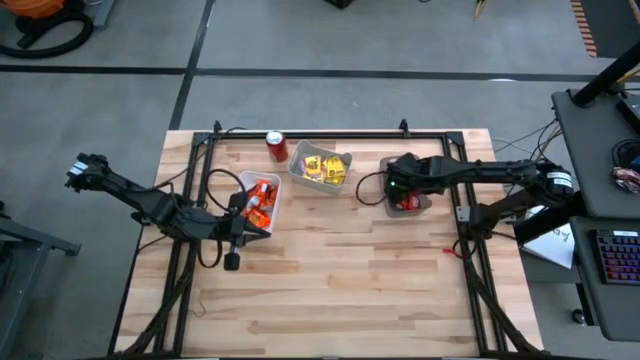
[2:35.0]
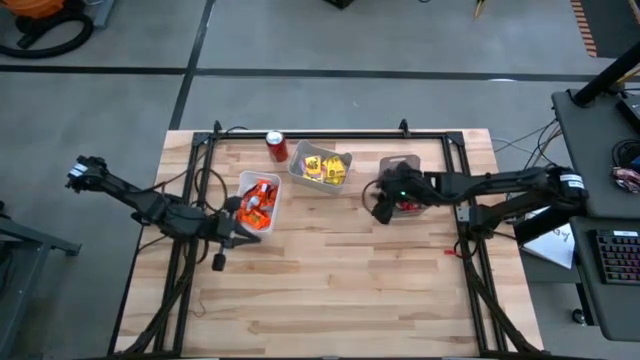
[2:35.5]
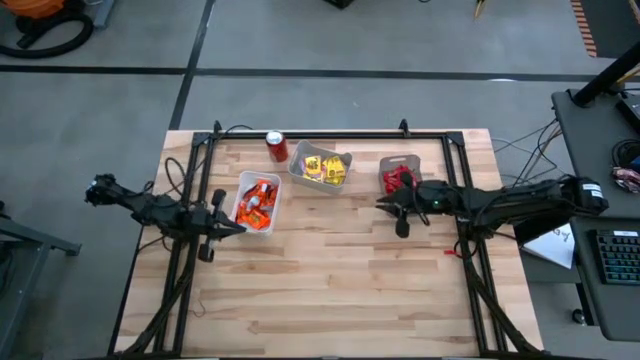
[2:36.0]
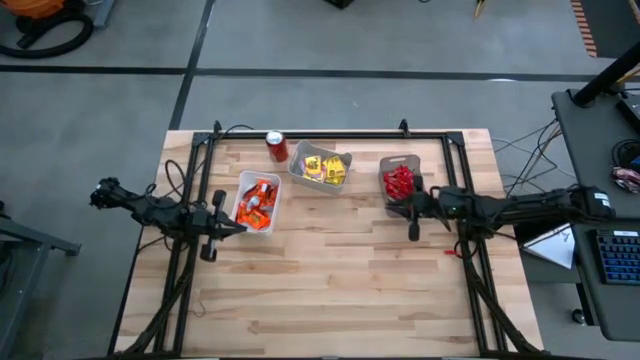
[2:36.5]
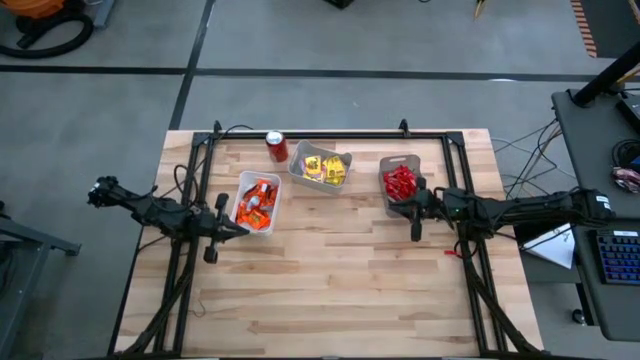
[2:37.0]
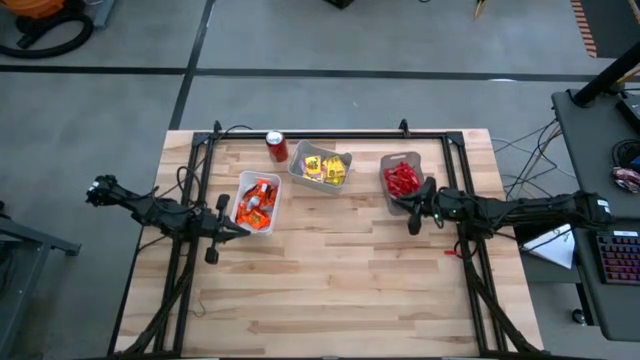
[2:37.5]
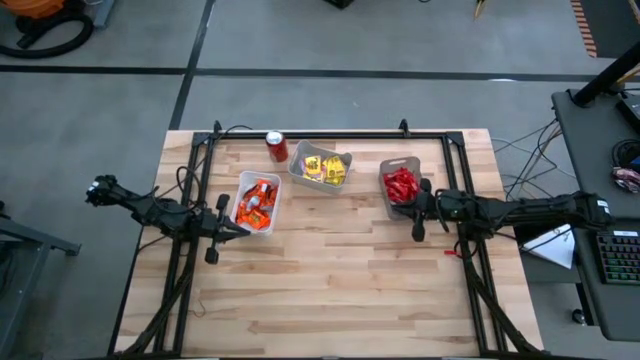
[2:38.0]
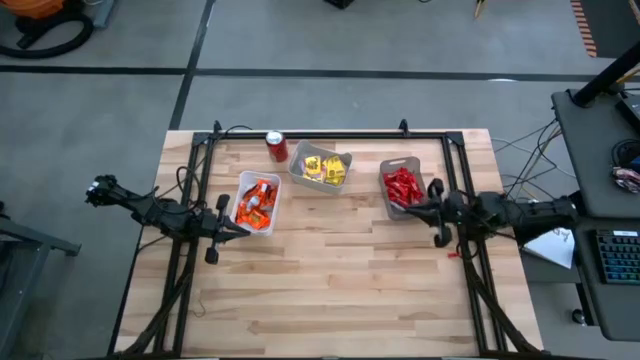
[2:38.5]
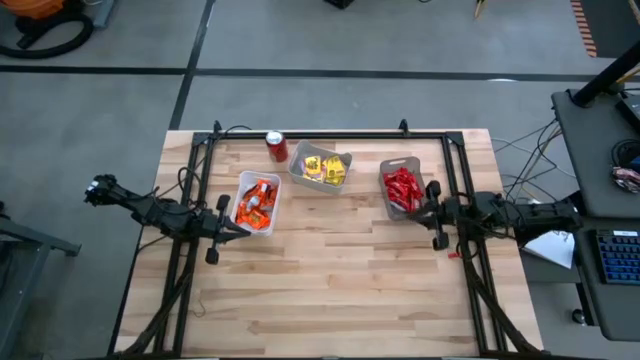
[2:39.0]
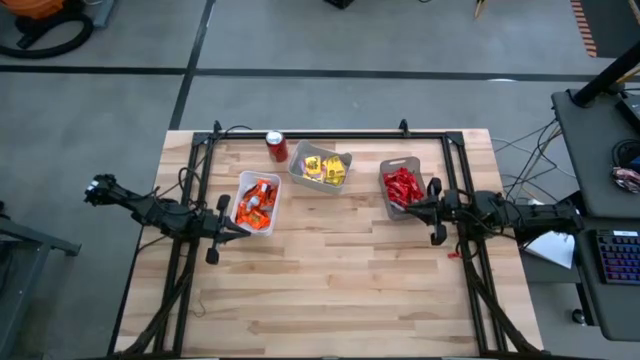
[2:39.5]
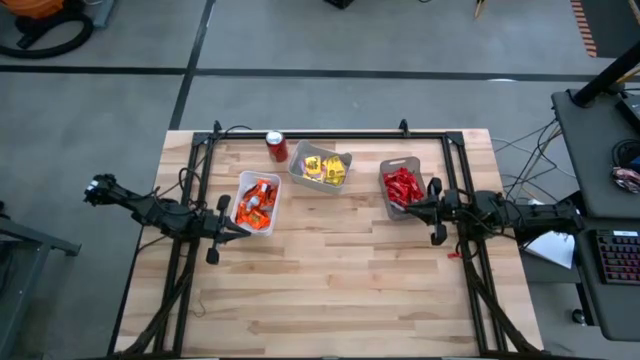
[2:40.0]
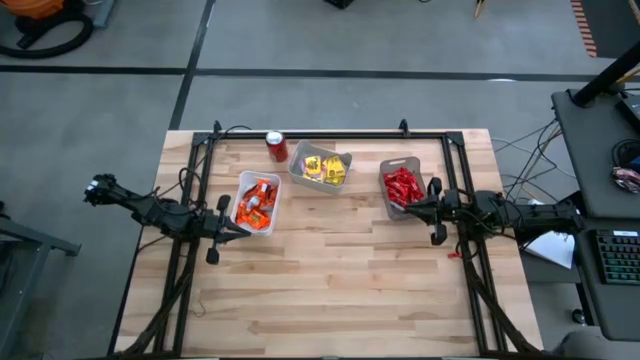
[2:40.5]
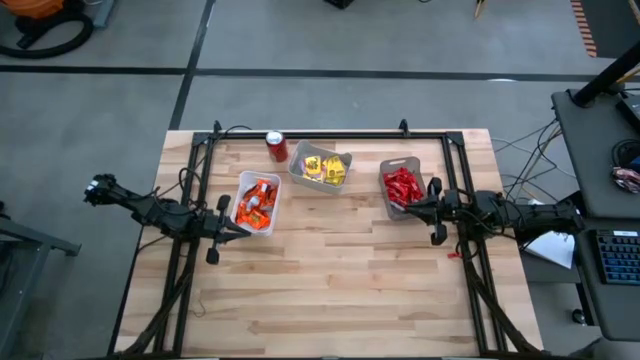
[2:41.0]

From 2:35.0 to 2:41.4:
Task: Sort candy
Return to Home Position

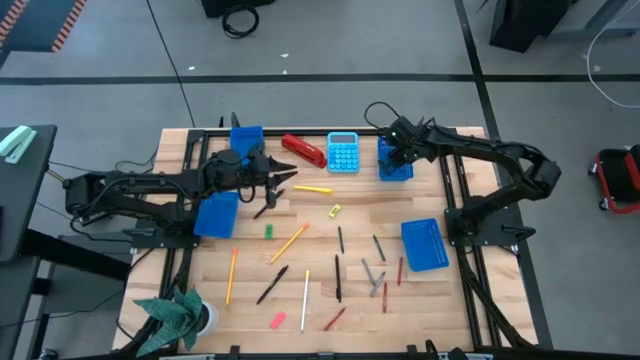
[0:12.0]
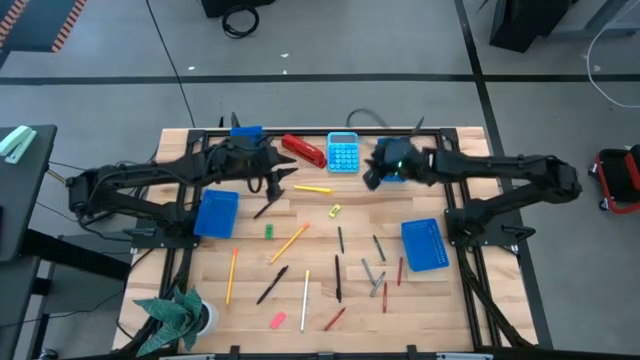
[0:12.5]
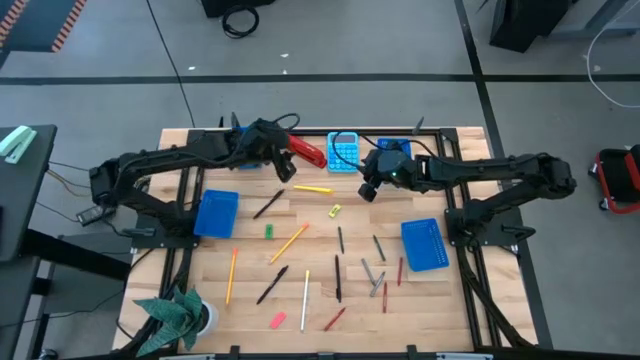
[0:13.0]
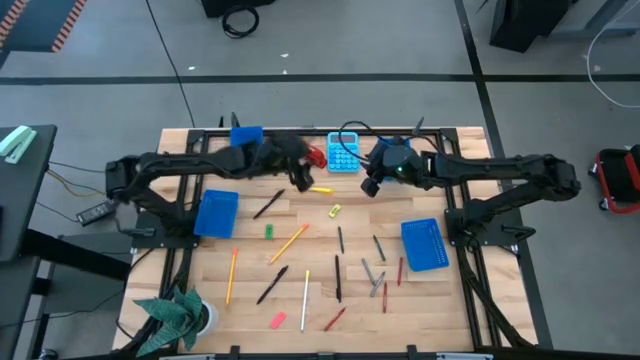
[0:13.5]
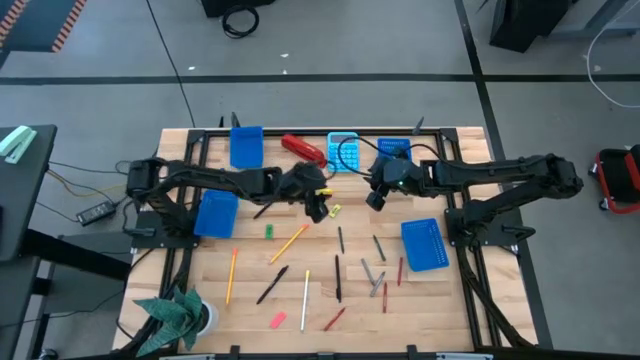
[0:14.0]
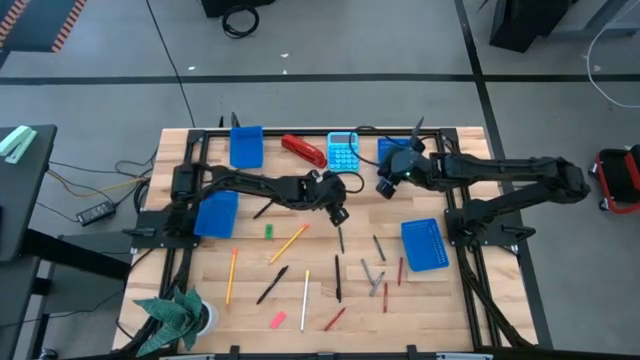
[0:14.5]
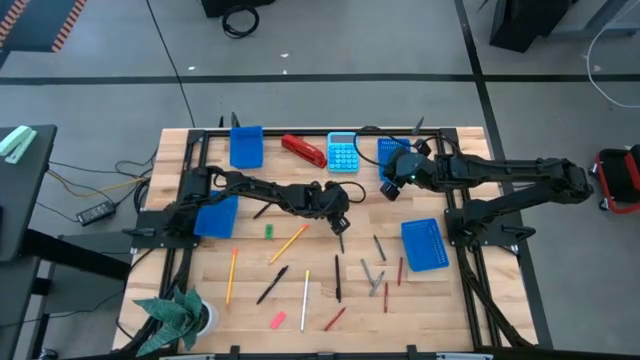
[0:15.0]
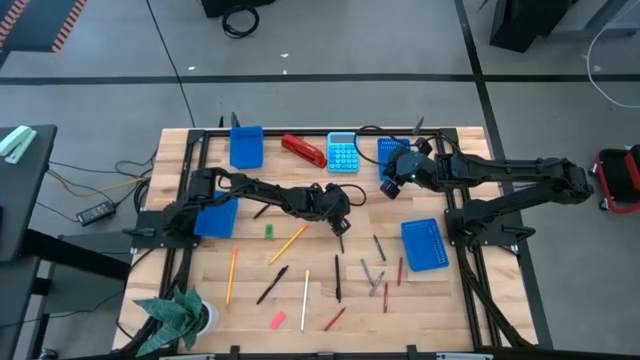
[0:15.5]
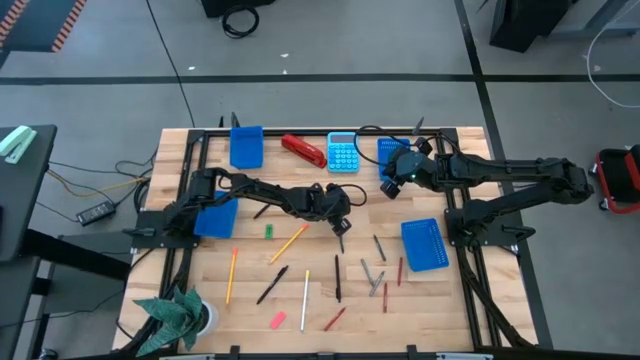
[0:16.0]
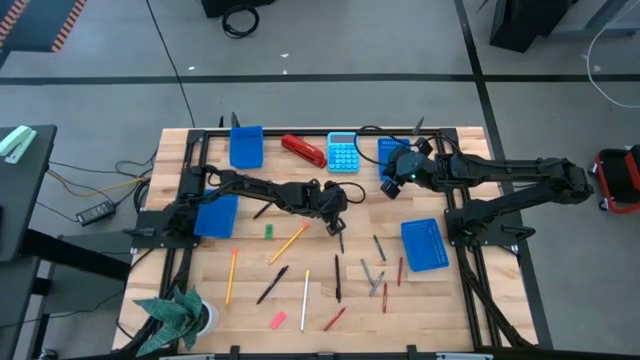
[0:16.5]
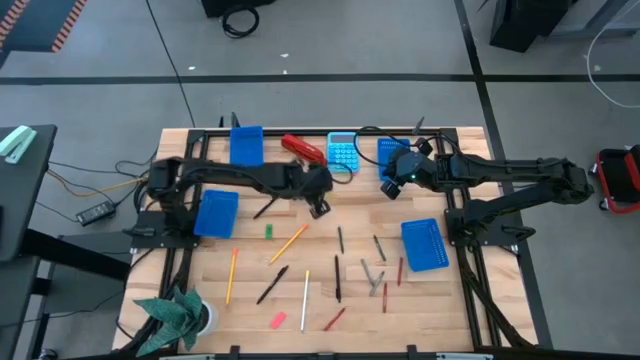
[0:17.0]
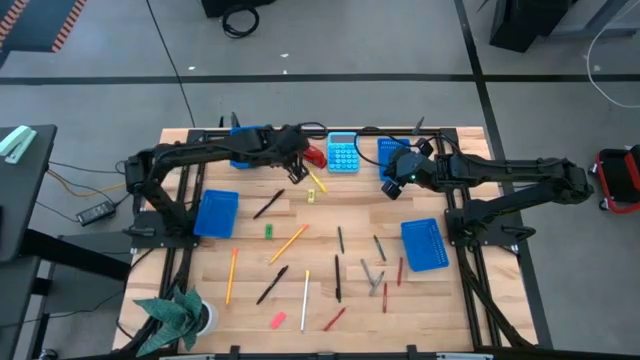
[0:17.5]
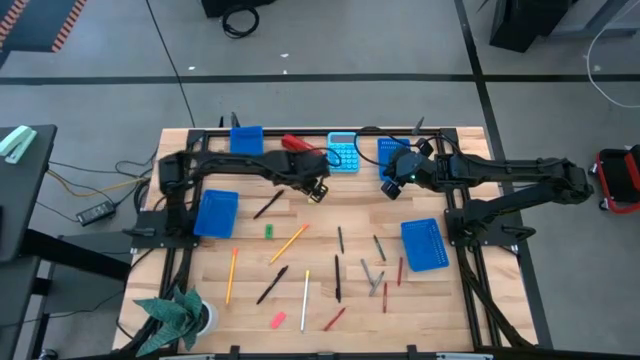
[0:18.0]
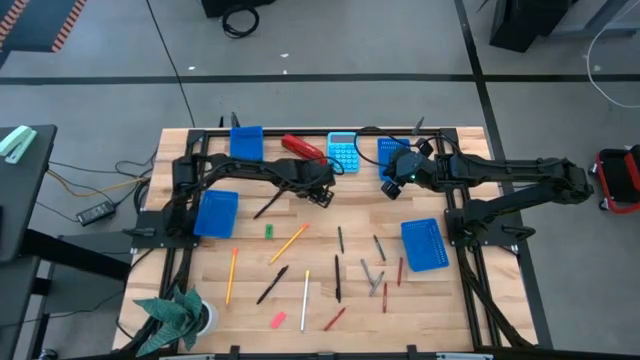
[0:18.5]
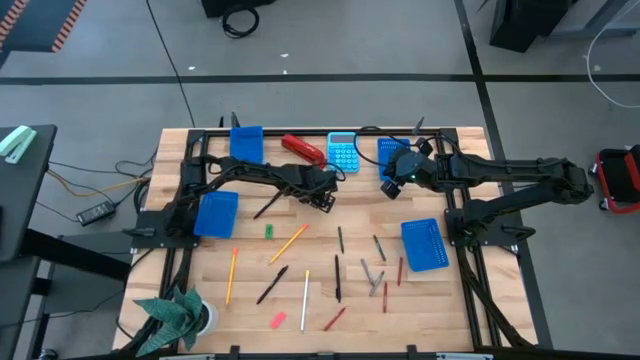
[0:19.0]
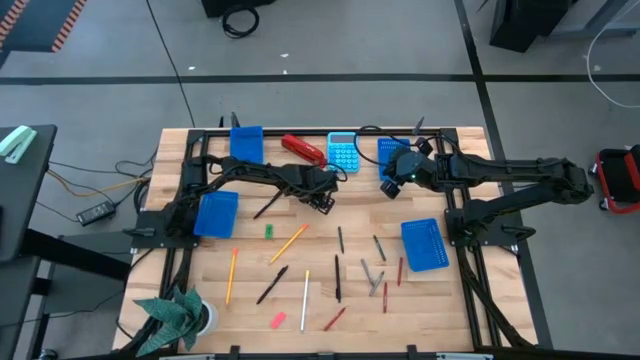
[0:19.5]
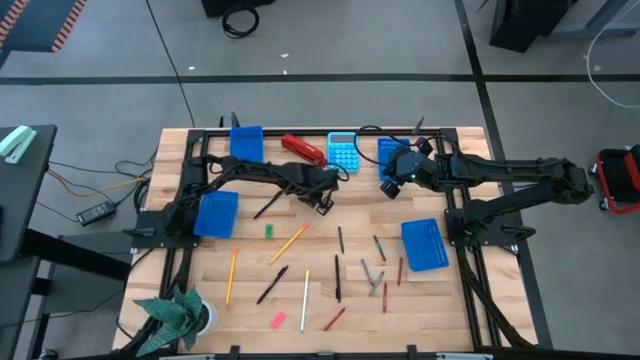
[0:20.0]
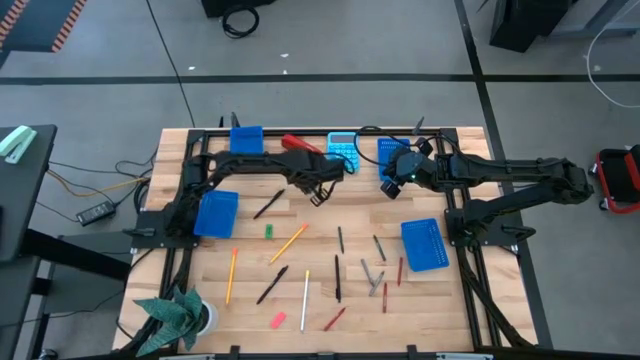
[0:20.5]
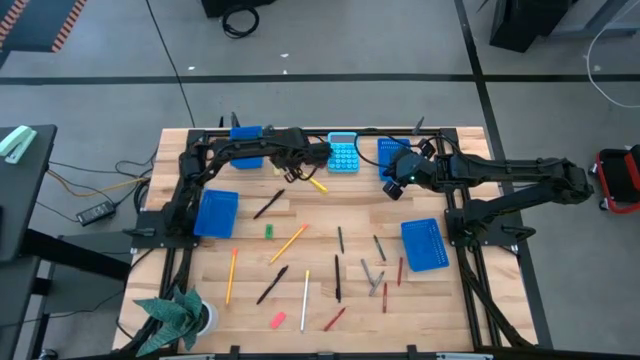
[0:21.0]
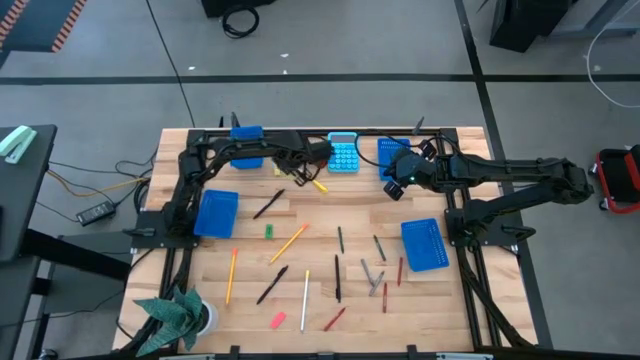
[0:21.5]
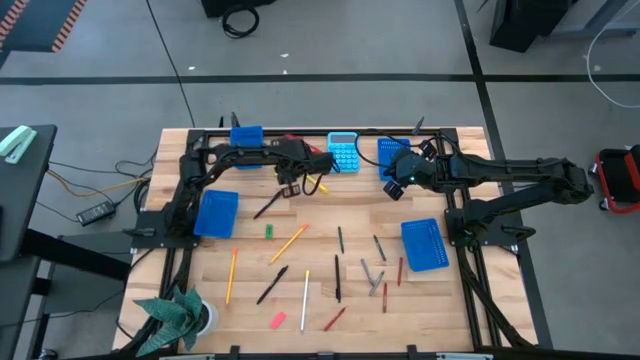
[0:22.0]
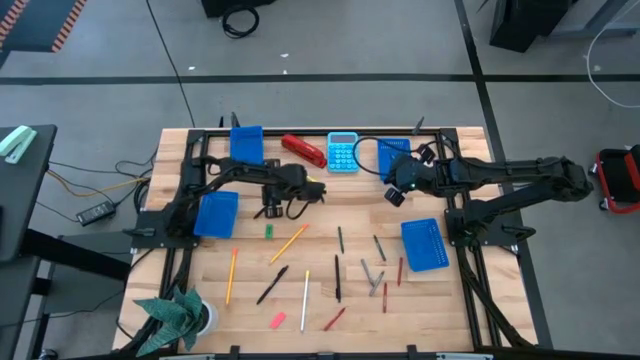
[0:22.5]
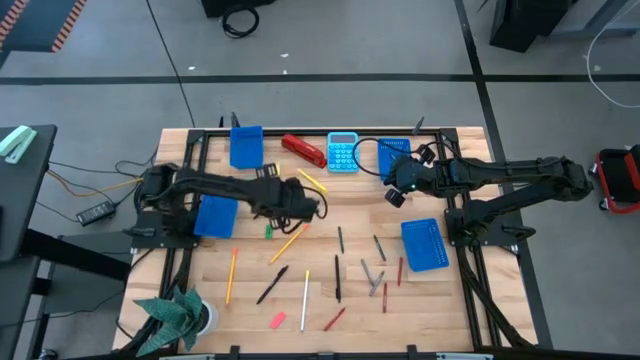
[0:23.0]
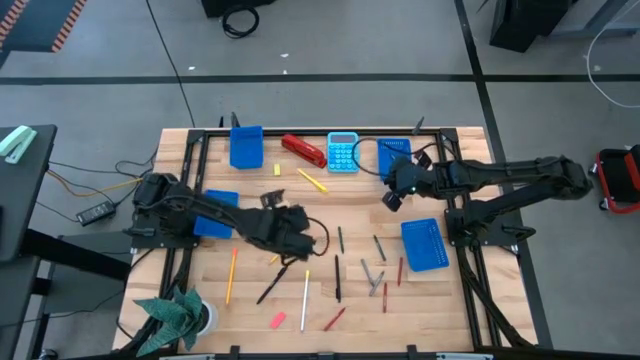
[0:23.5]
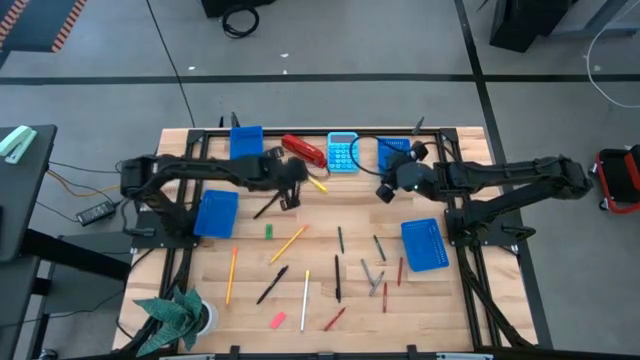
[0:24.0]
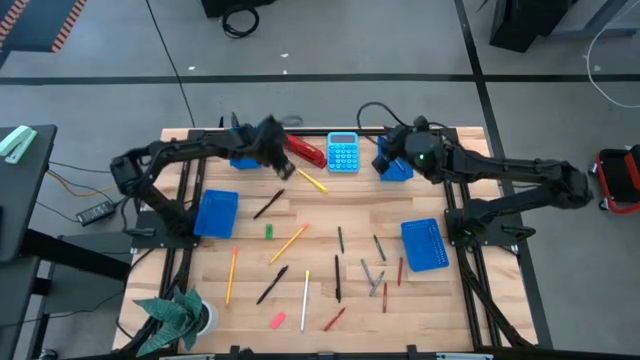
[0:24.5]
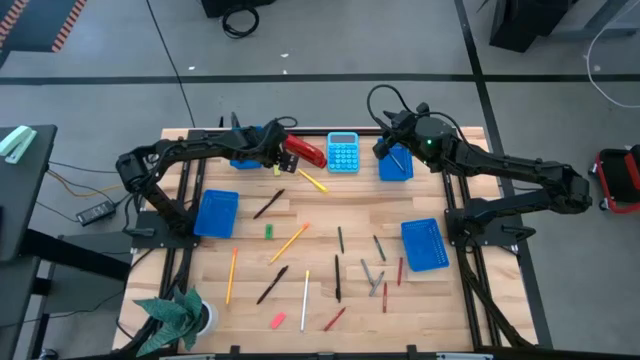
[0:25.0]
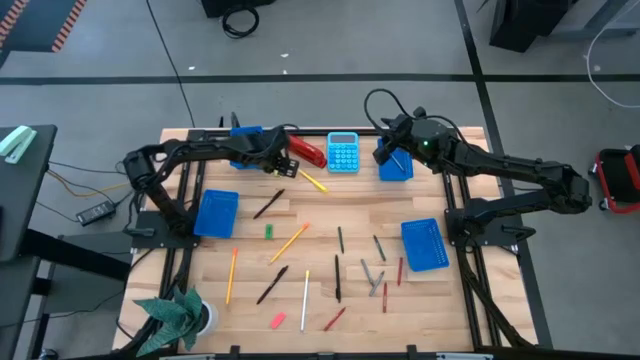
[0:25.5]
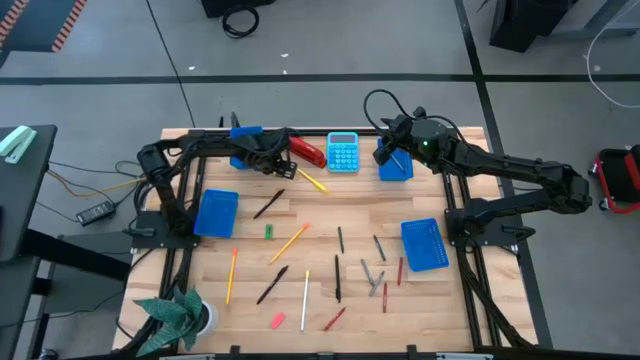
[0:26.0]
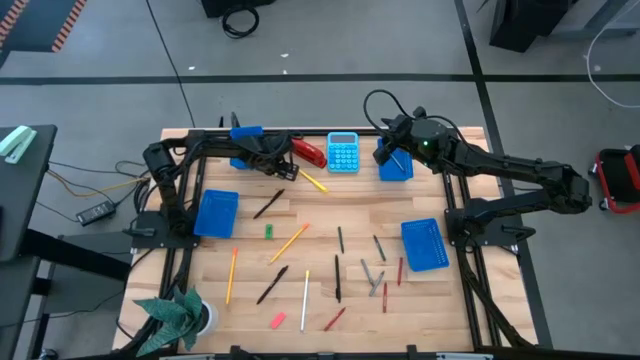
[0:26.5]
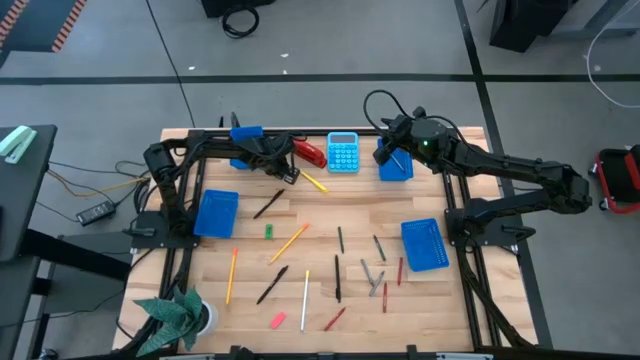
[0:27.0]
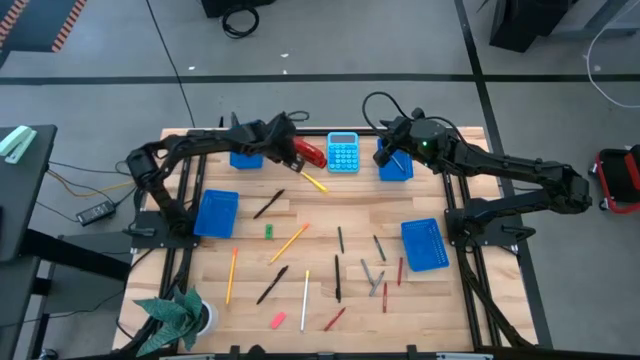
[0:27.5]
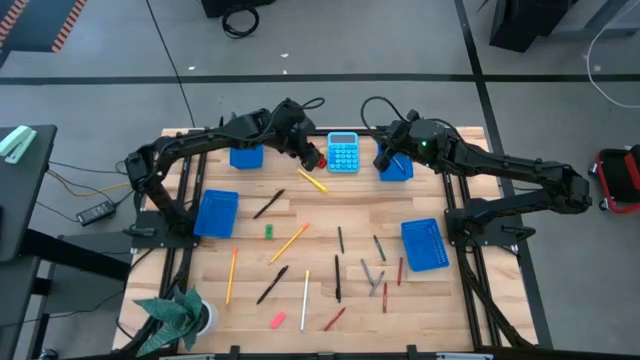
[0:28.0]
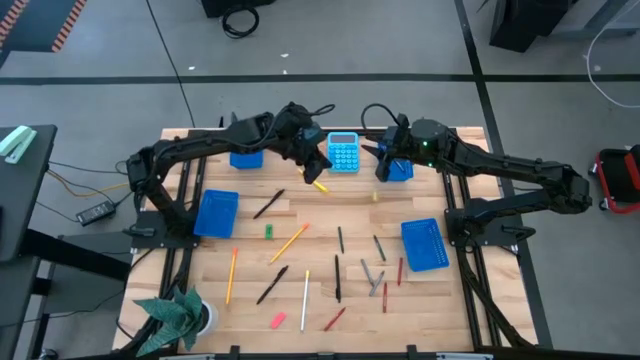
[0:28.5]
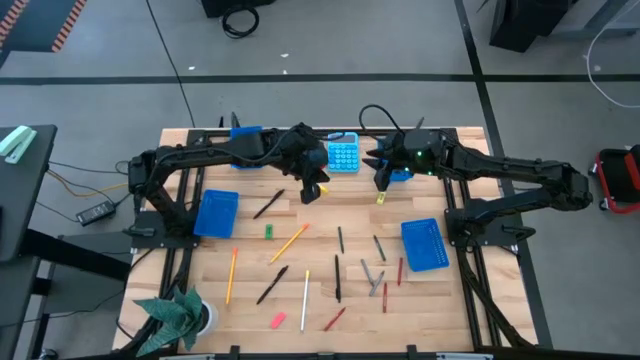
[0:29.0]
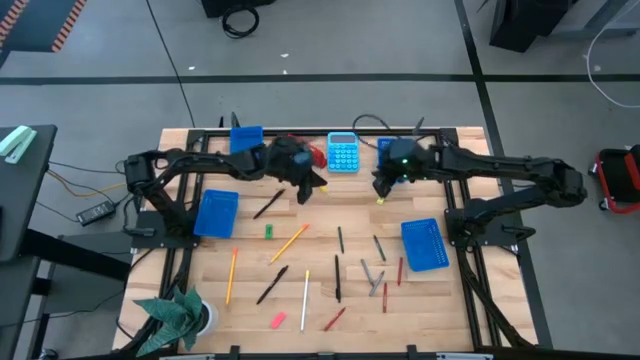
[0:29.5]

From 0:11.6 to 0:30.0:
Task: Sort crayons/erasers/pens/pencils in bins
Put the yellow eraser into the top left bin
